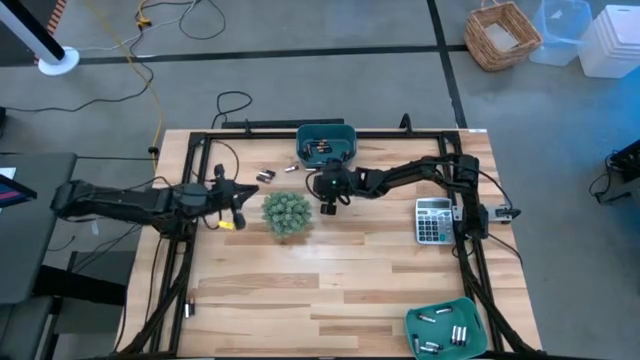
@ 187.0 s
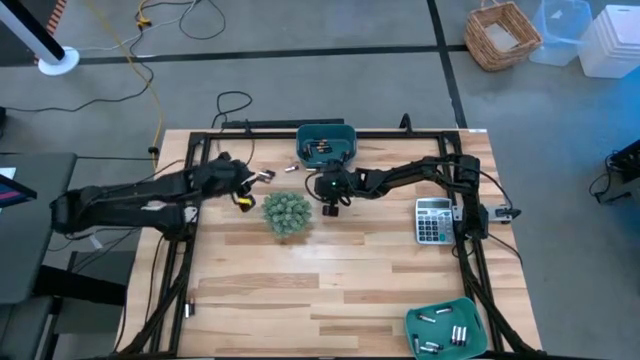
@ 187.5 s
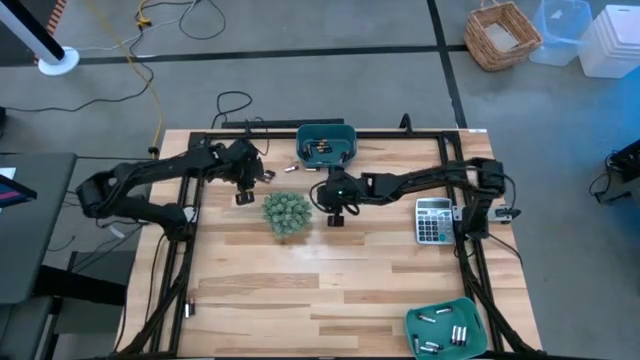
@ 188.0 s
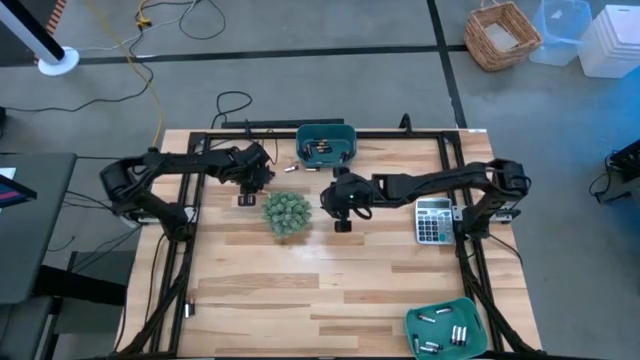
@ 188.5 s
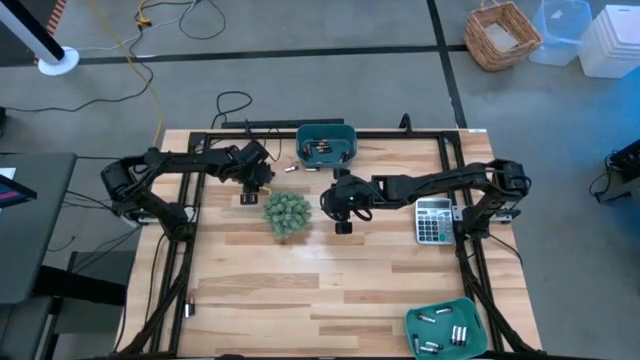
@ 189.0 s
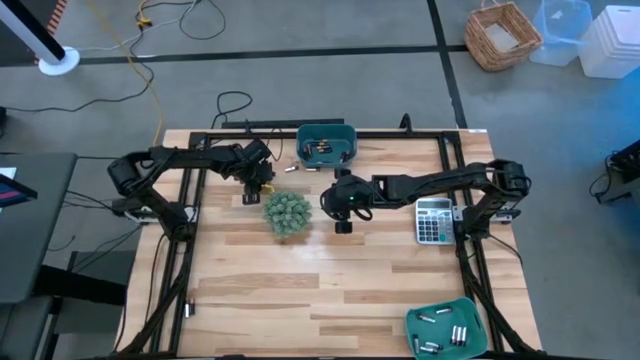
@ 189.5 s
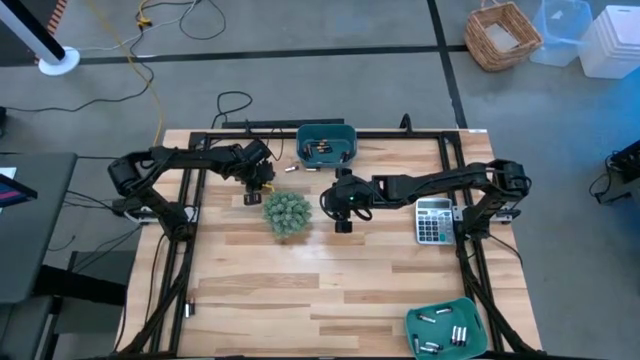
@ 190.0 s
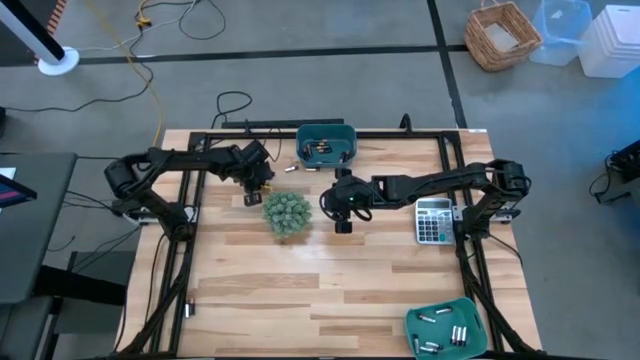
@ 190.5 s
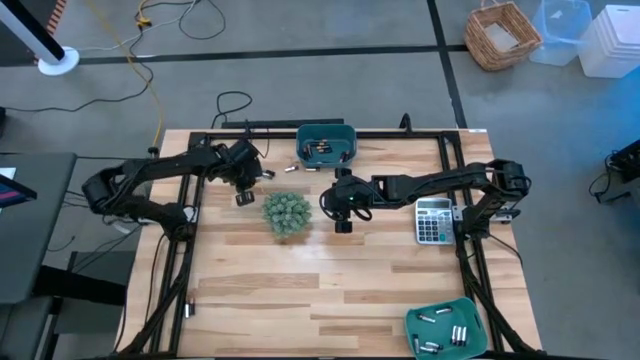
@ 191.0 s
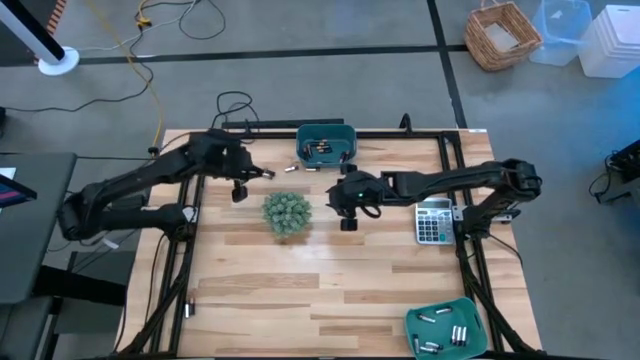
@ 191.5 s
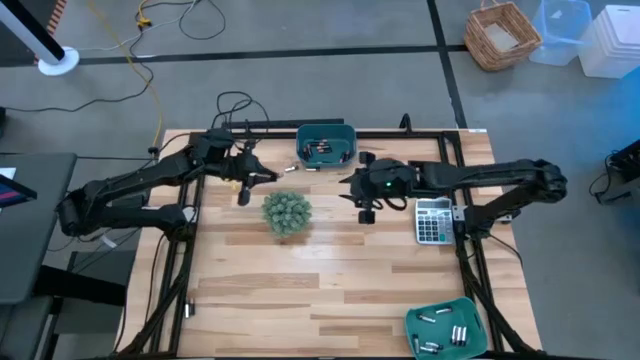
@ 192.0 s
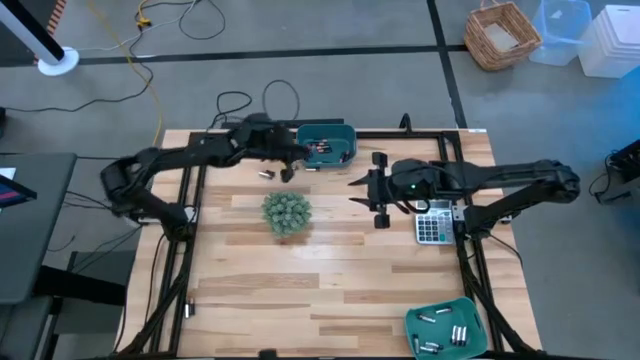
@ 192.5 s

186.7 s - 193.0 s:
Task: Sort batteries
Put the black battery into the blue bin

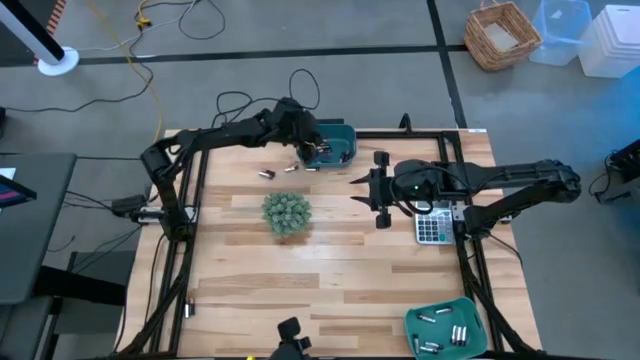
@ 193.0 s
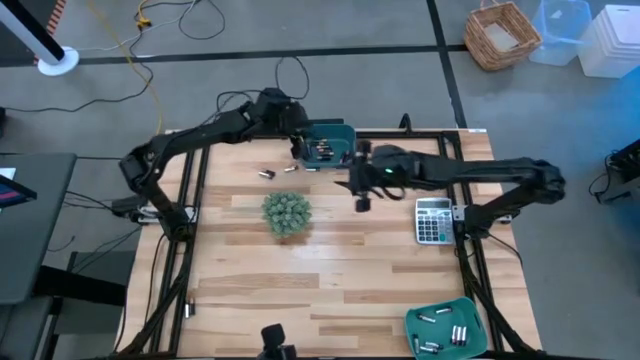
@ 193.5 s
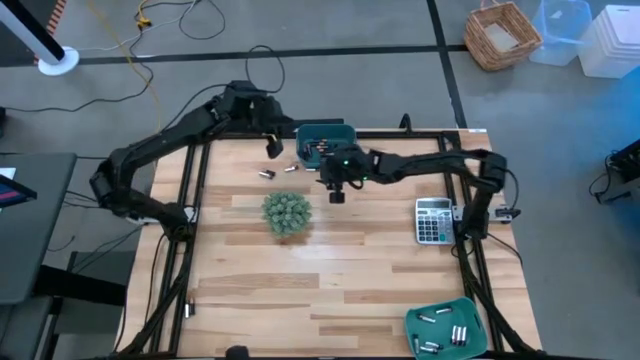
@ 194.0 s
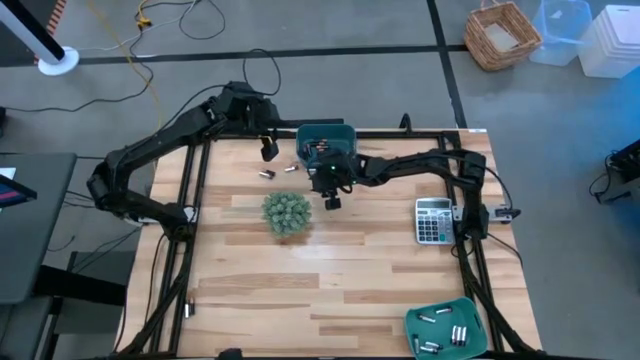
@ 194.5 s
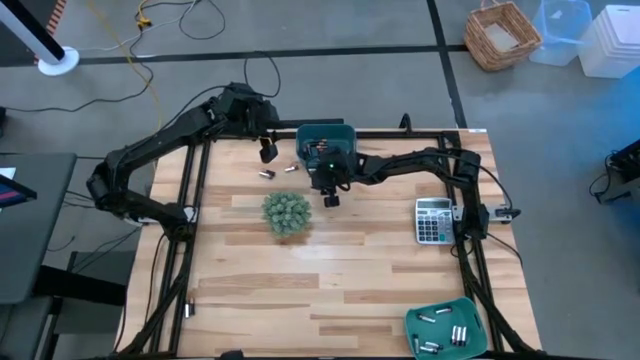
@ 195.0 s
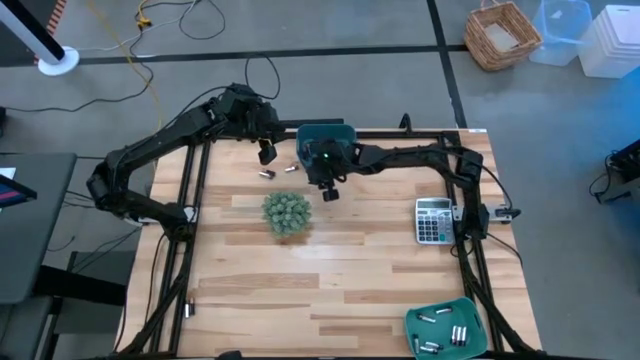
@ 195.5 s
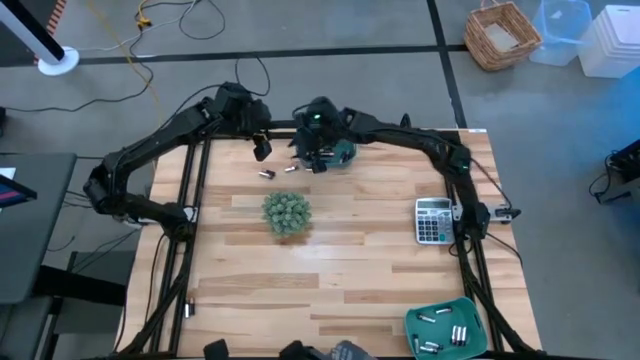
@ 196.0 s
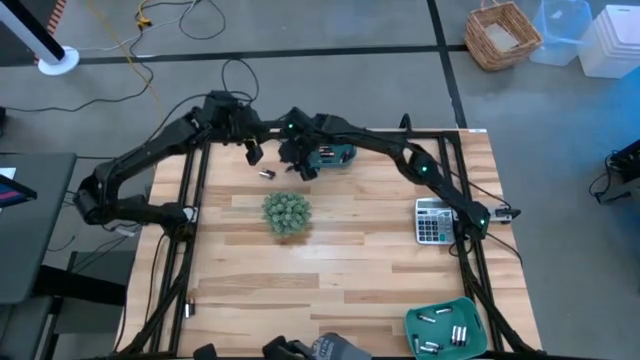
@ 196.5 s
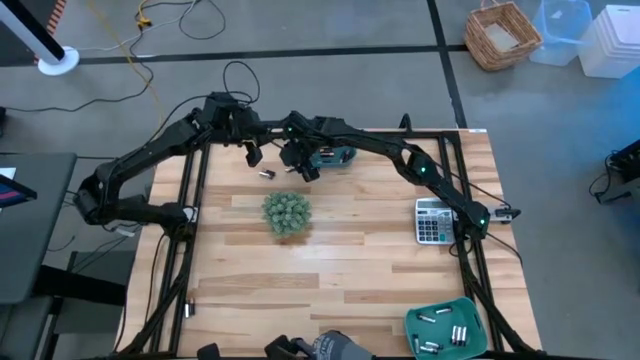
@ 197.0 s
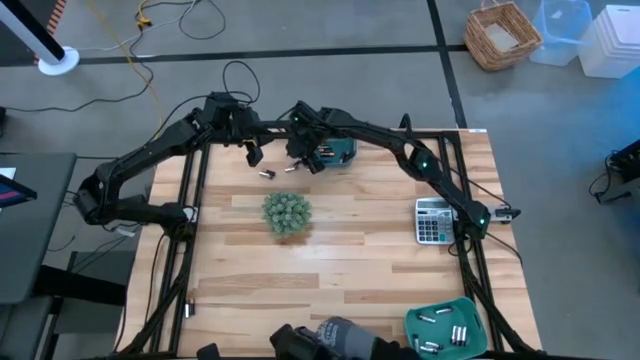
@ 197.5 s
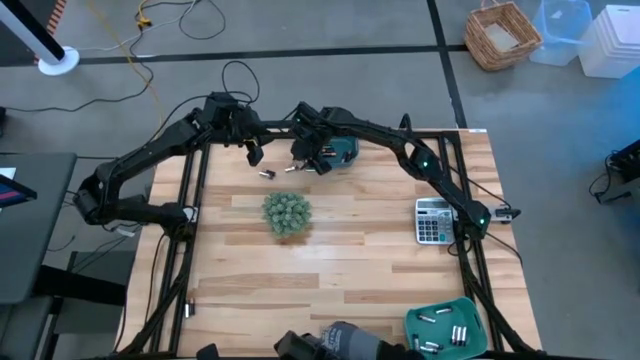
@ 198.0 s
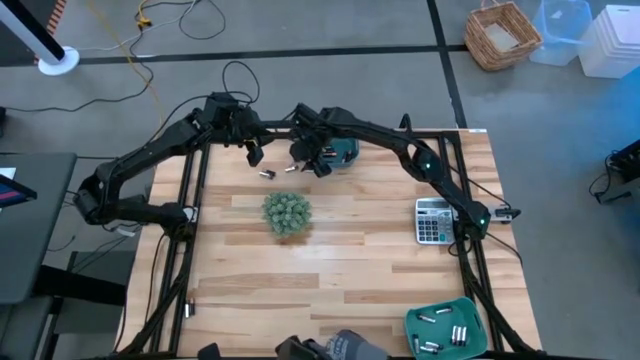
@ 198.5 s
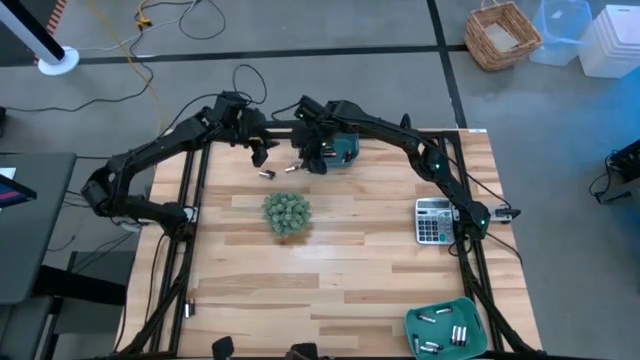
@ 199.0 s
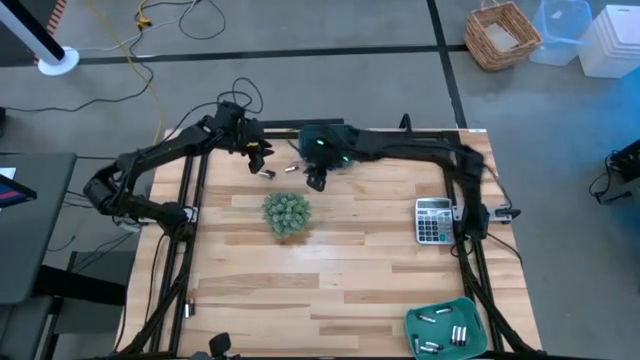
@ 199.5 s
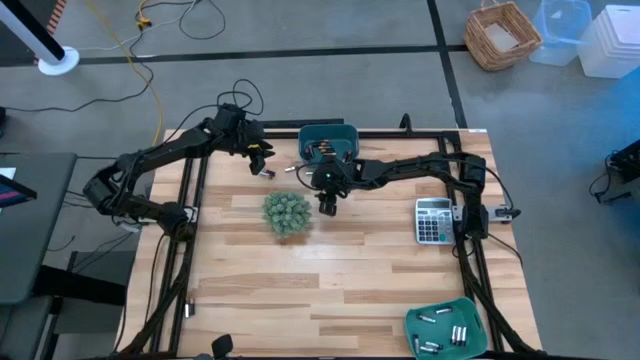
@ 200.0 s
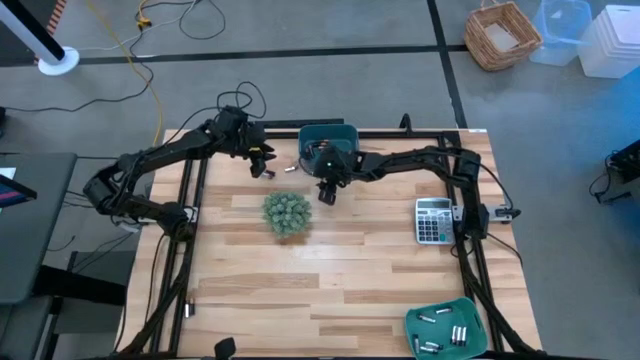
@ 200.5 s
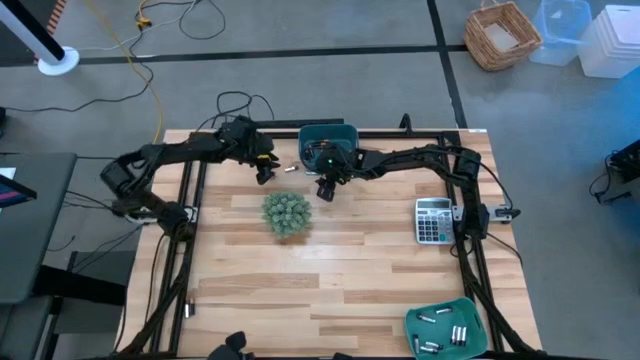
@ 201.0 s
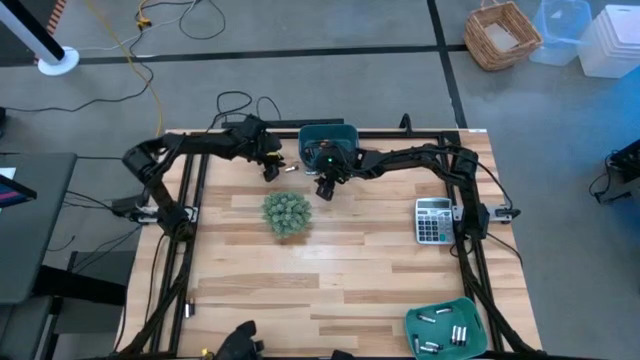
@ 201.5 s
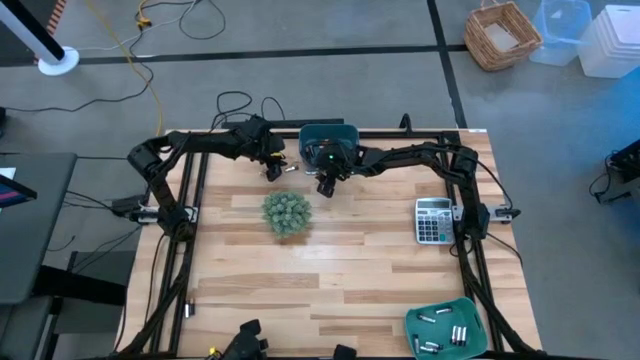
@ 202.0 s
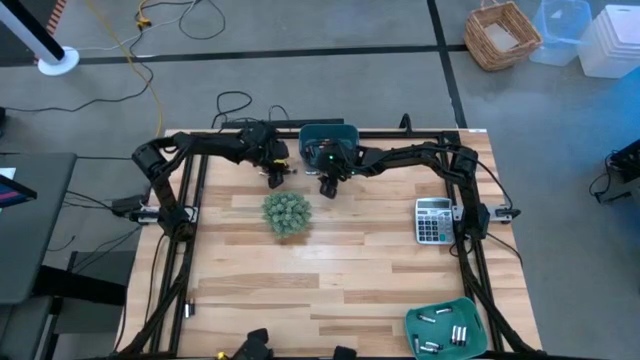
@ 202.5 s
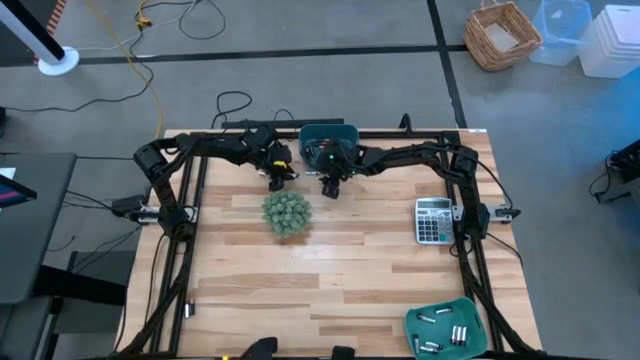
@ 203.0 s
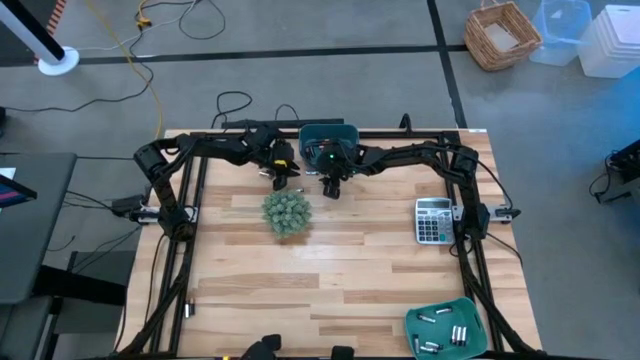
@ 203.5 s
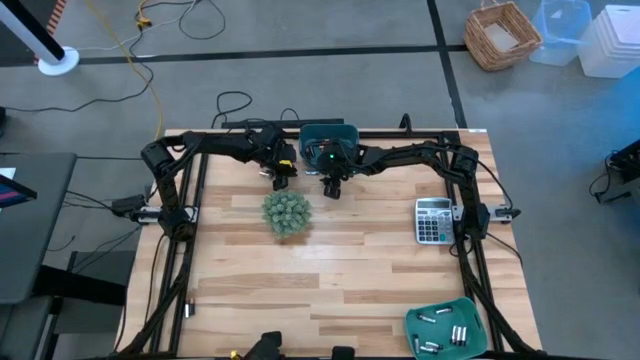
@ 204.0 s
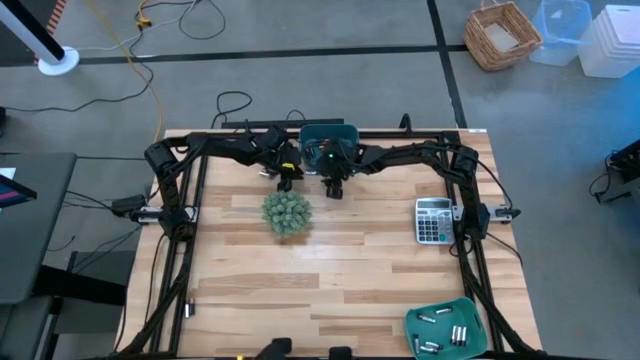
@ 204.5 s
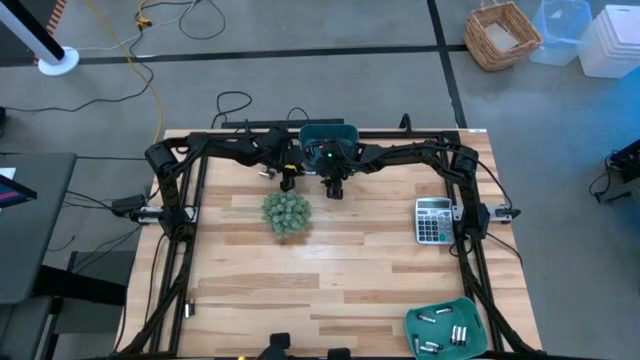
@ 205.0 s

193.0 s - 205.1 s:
Put the silver battery into the green bin

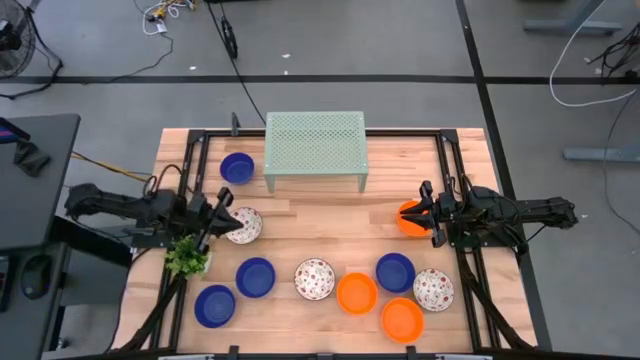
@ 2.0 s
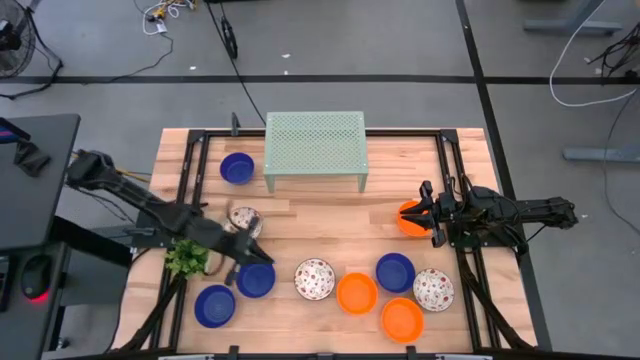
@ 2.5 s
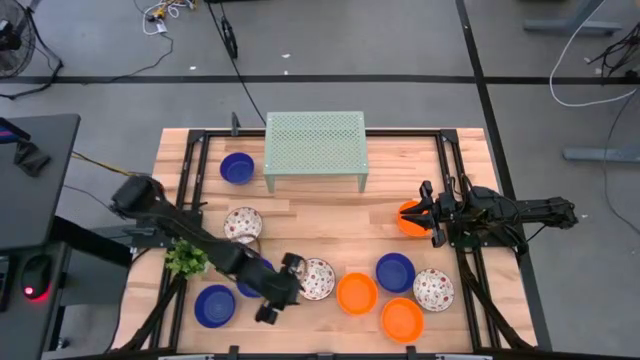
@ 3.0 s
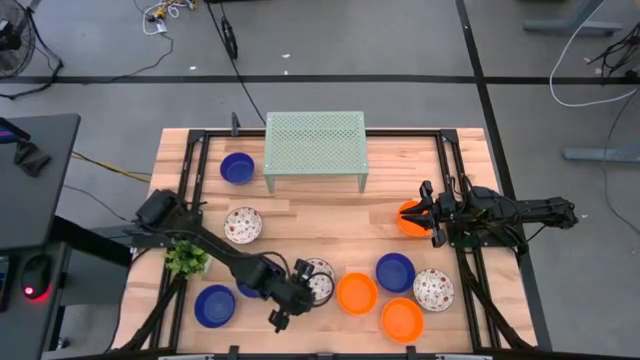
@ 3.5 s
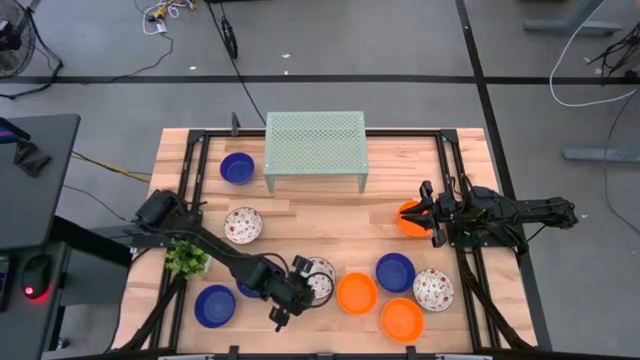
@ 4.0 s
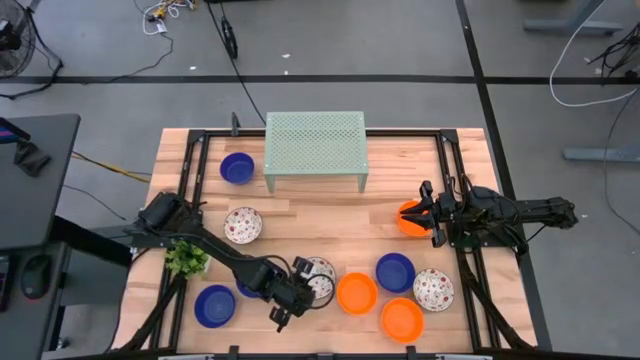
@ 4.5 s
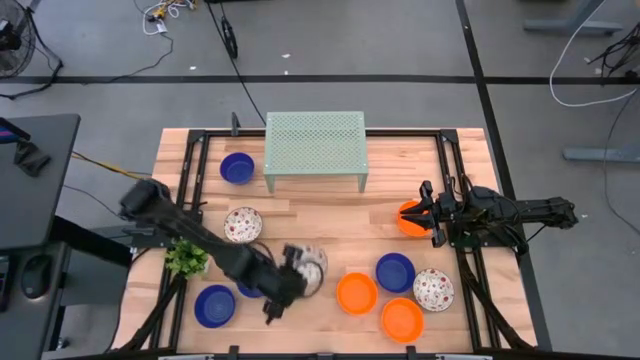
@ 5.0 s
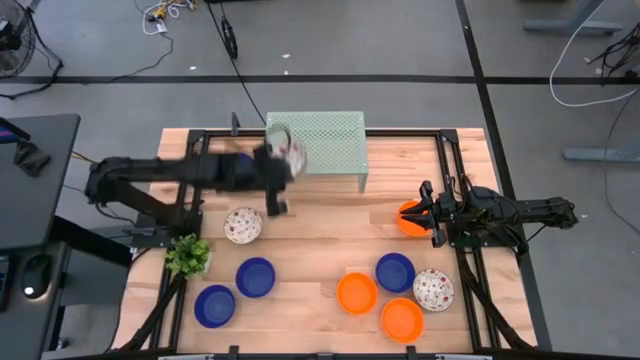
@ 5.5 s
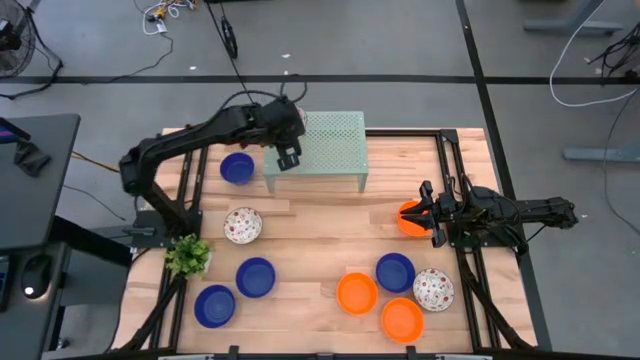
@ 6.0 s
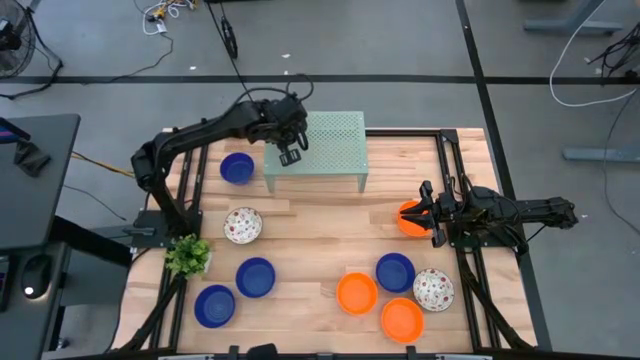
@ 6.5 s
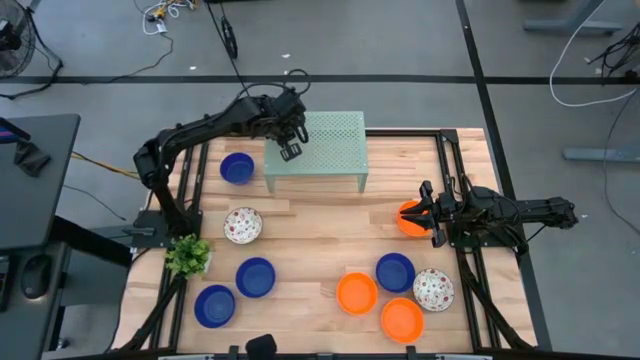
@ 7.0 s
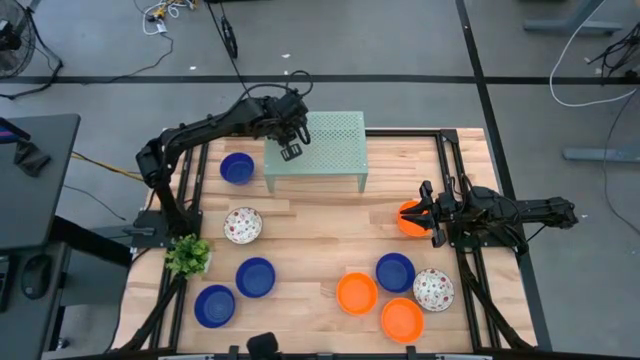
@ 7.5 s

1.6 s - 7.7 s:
Task: Pick & Place Mini bowls
Put the white patterned bowl on the shelf
